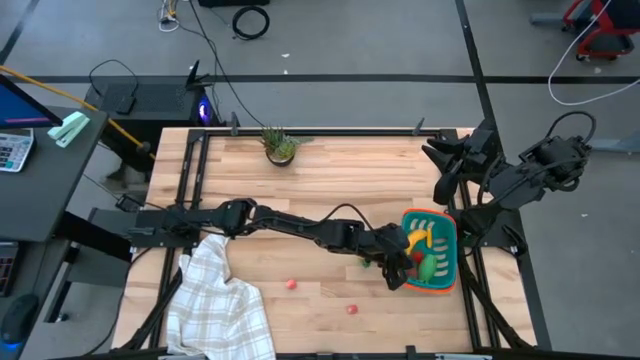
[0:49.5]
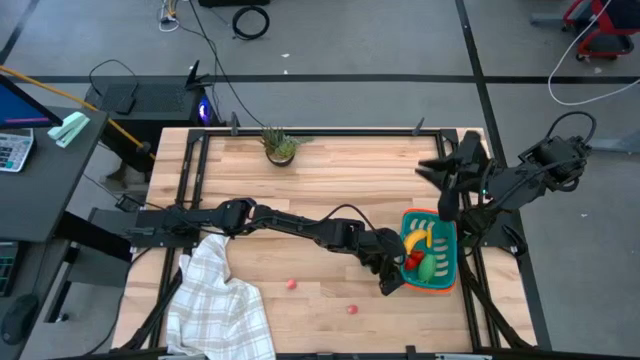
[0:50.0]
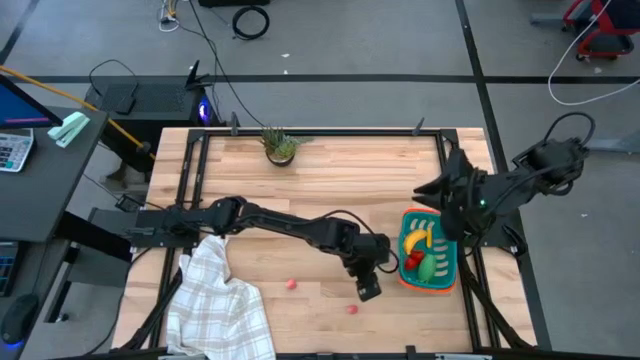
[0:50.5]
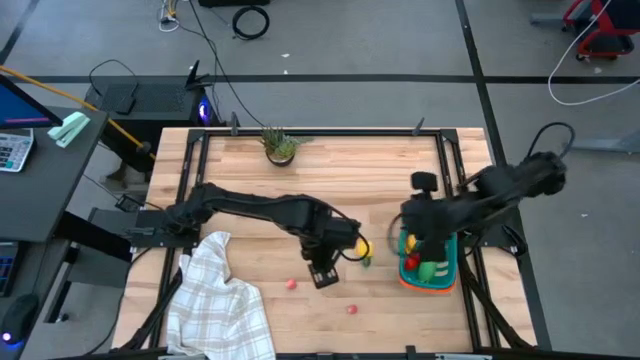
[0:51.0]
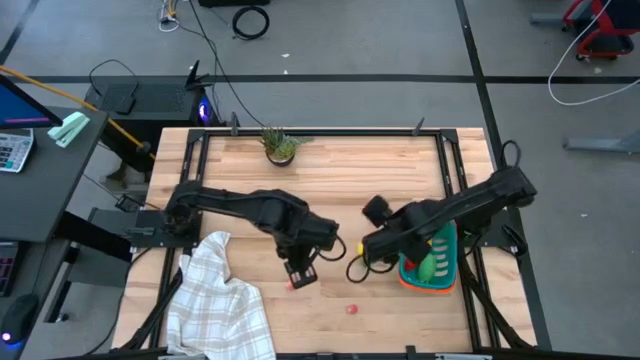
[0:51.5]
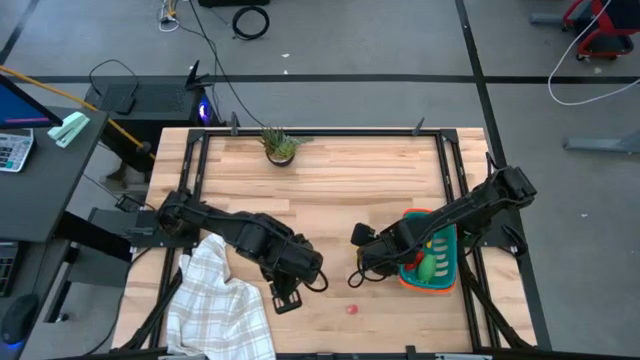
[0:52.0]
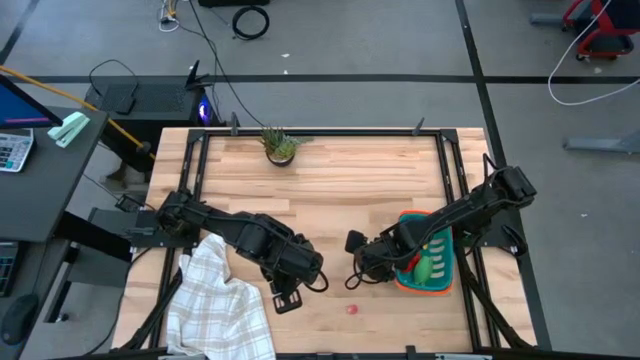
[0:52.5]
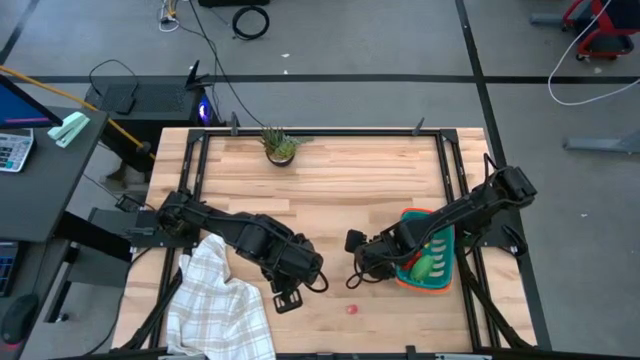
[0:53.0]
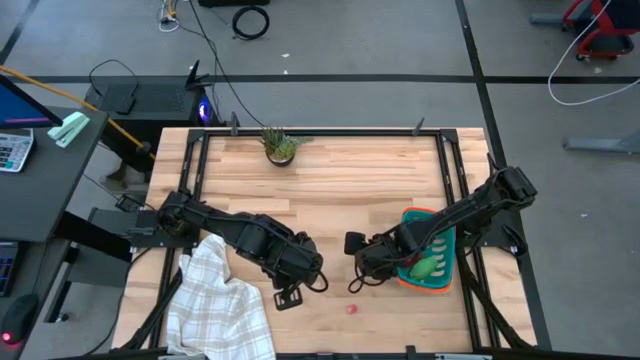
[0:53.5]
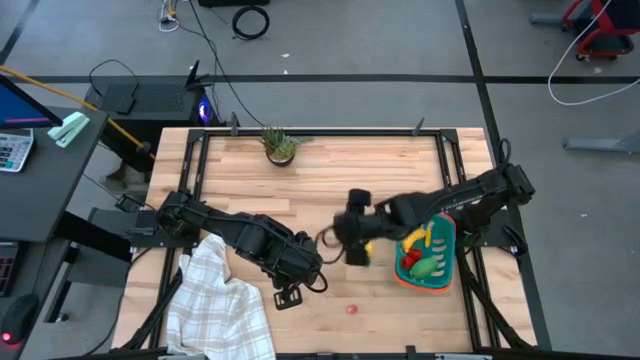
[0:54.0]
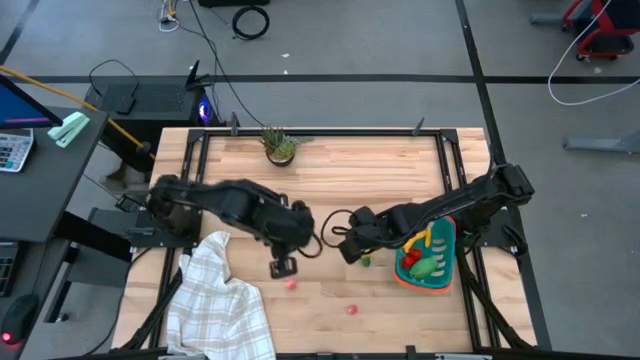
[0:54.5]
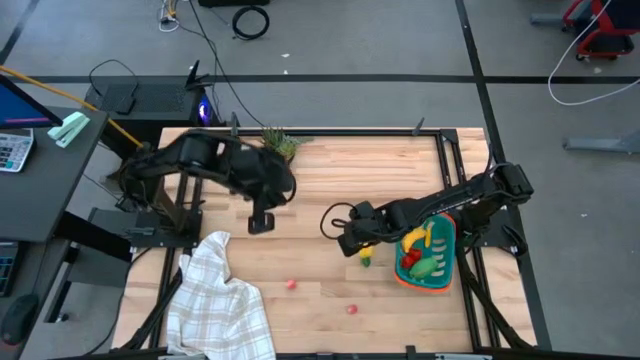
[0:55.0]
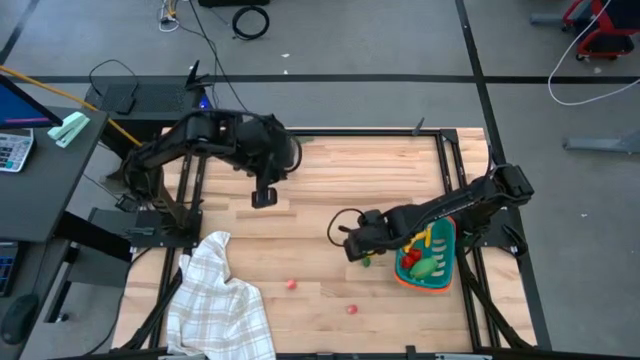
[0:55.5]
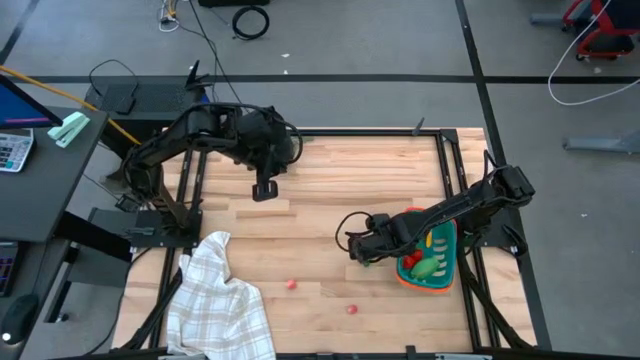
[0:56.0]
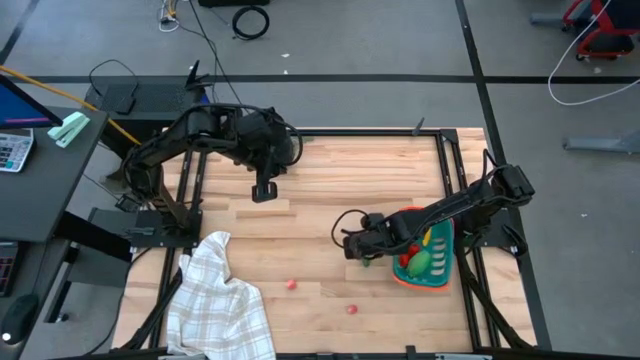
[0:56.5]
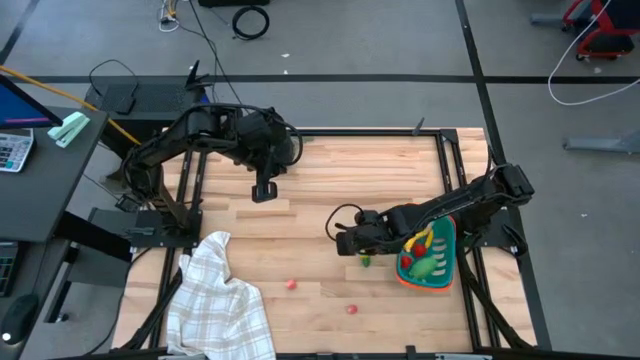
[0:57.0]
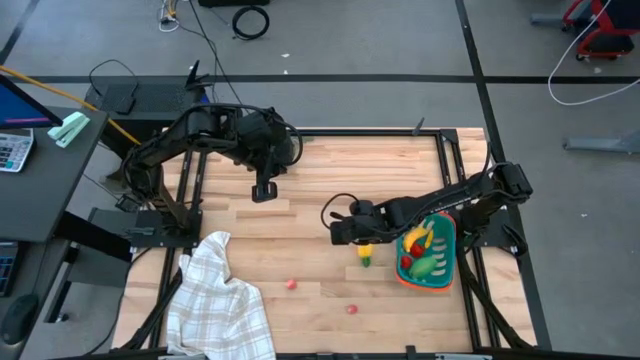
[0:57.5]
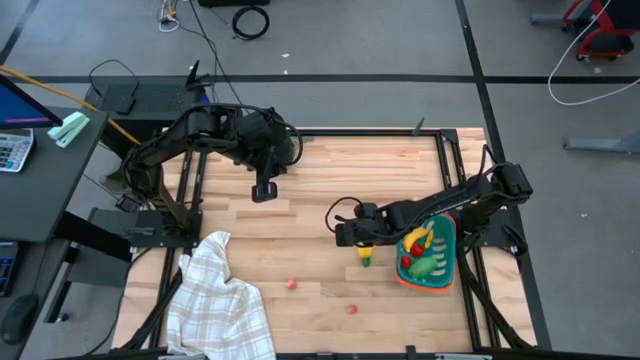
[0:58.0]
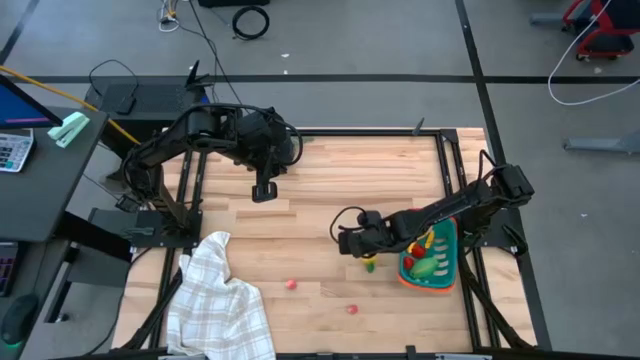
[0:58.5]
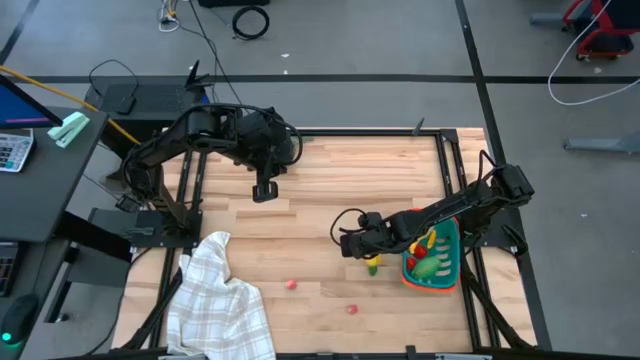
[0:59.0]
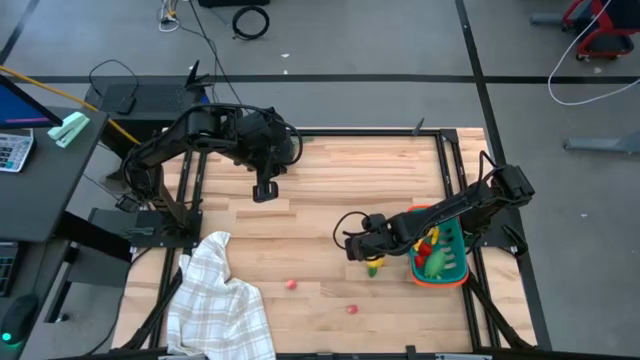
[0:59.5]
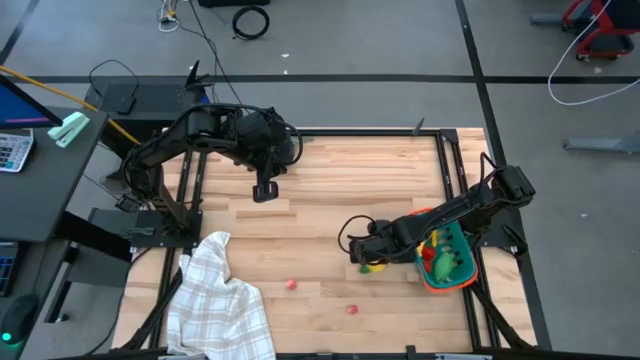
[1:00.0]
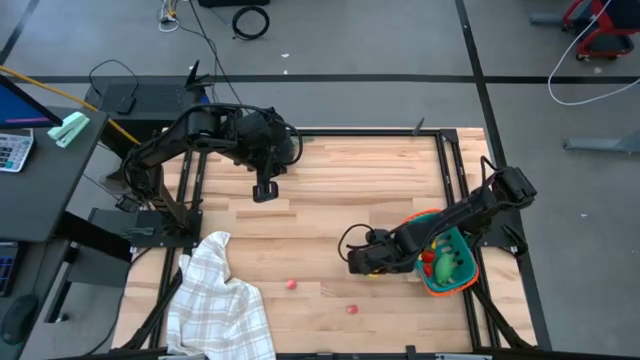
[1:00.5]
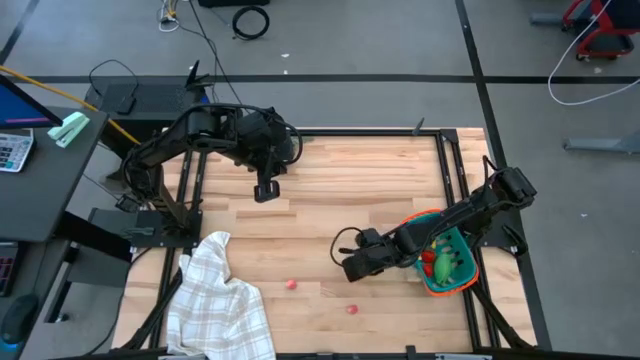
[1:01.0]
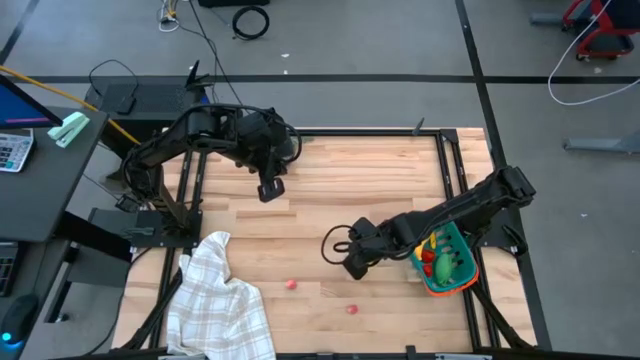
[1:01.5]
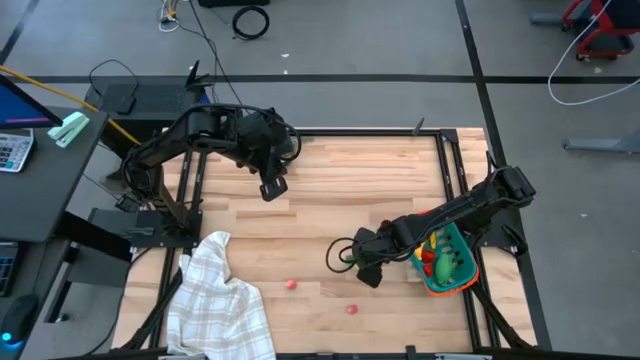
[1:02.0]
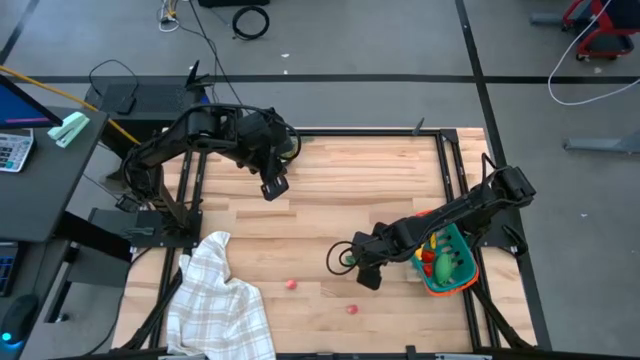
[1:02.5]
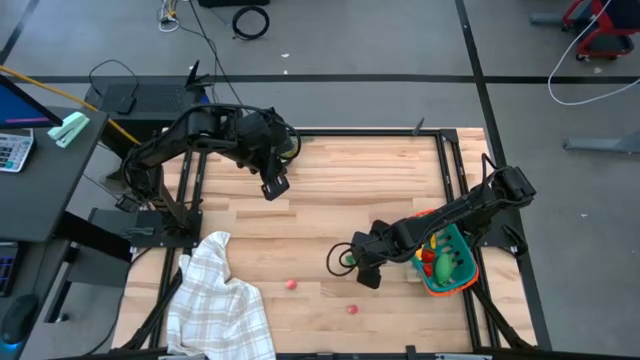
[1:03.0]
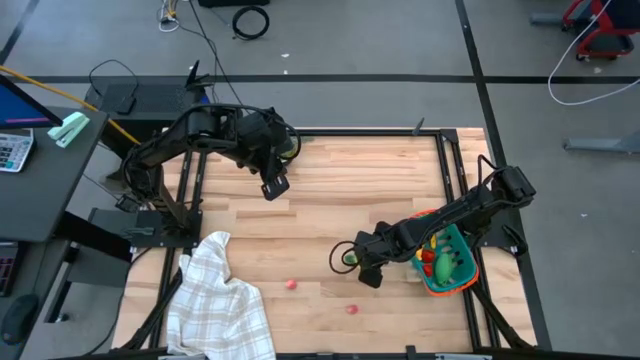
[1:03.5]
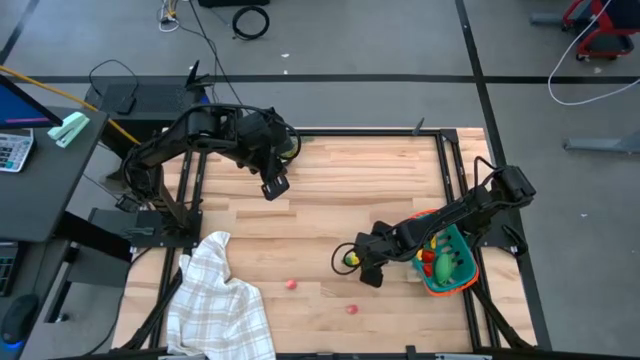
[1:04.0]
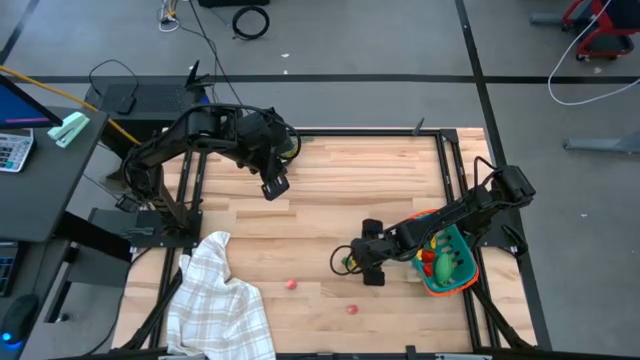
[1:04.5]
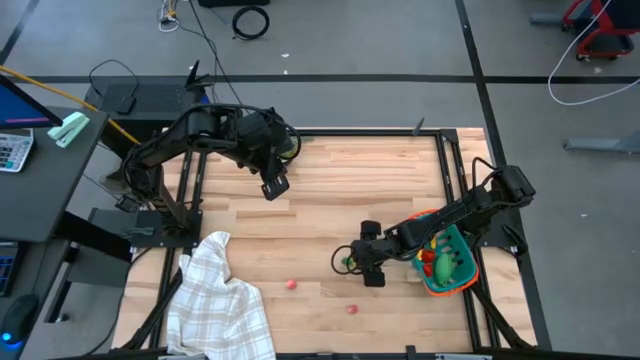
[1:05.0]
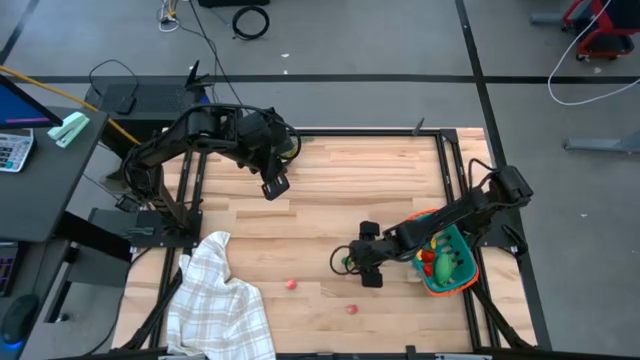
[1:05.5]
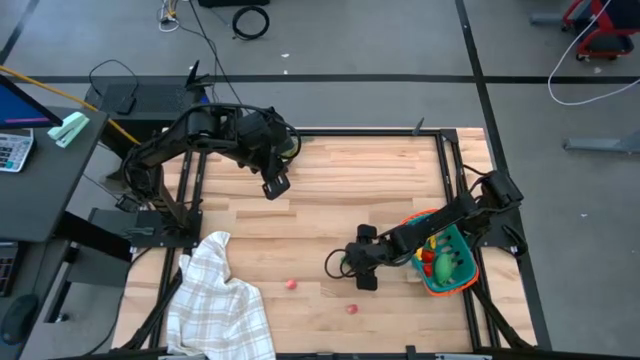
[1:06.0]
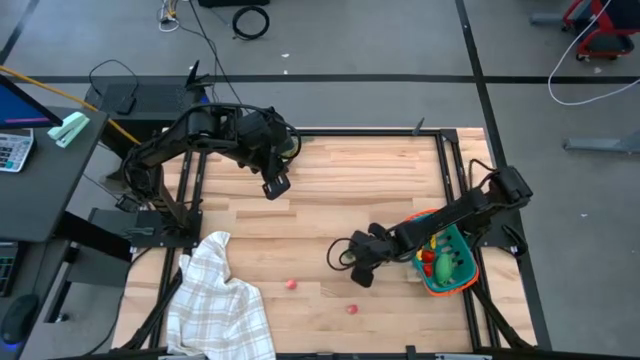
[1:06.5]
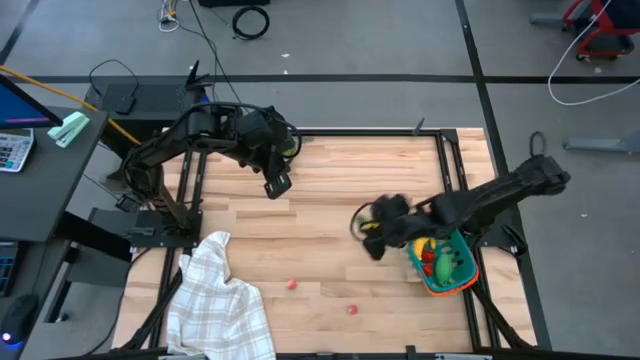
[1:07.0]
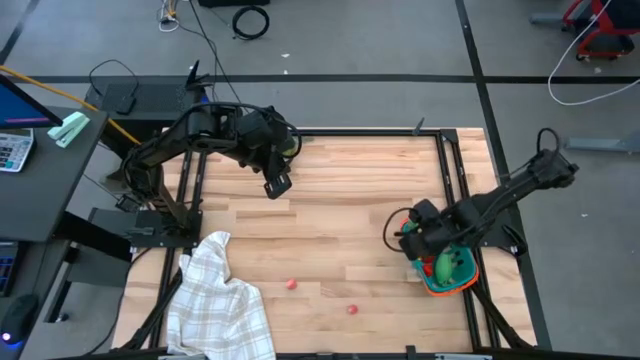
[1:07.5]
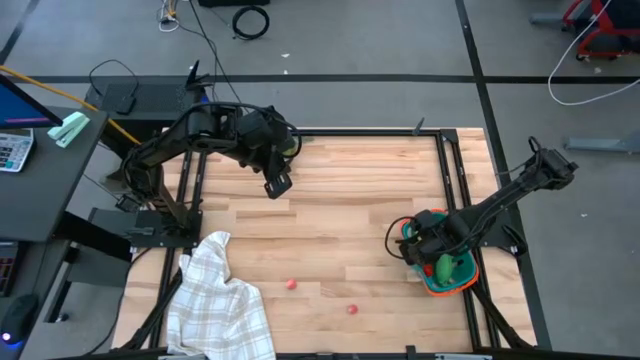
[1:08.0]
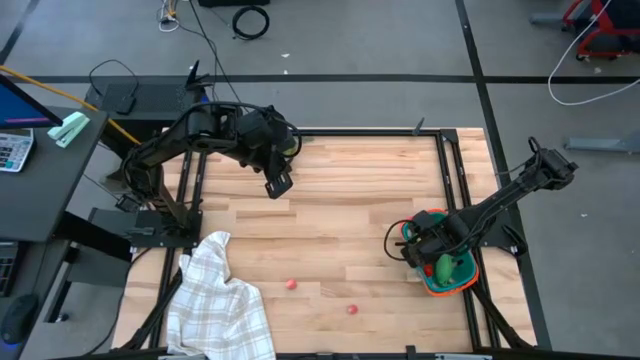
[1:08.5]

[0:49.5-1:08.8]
Task: Pick and placing Produce into tupperware
Put the yellow pineapple into the blue basket
